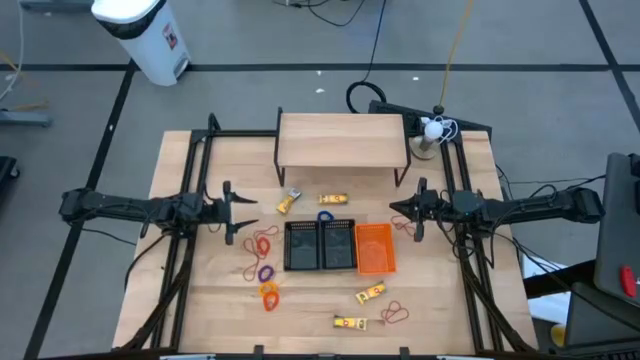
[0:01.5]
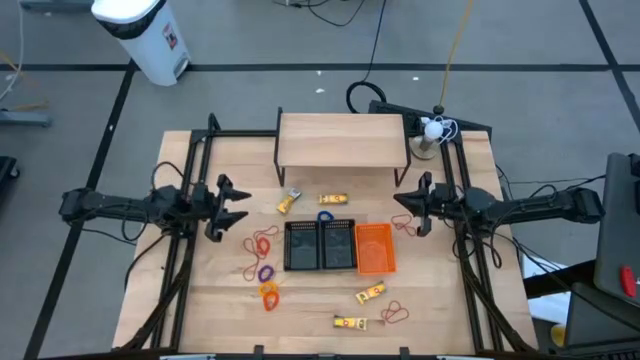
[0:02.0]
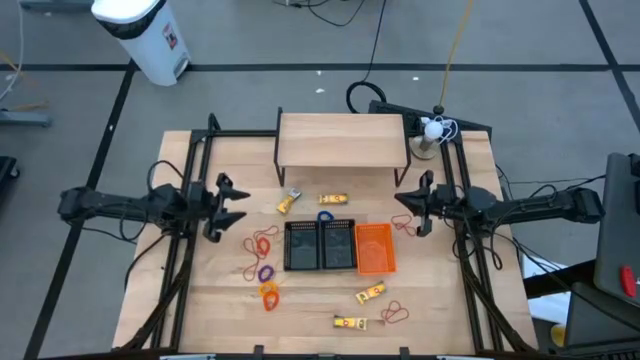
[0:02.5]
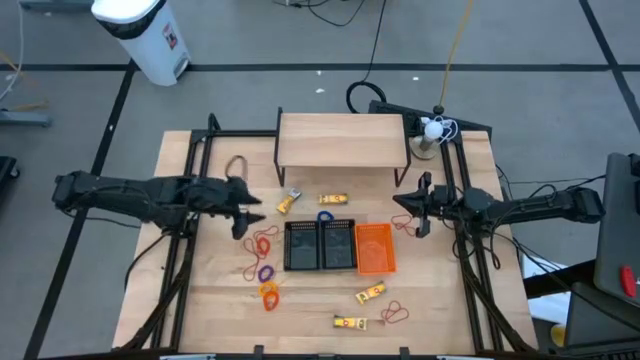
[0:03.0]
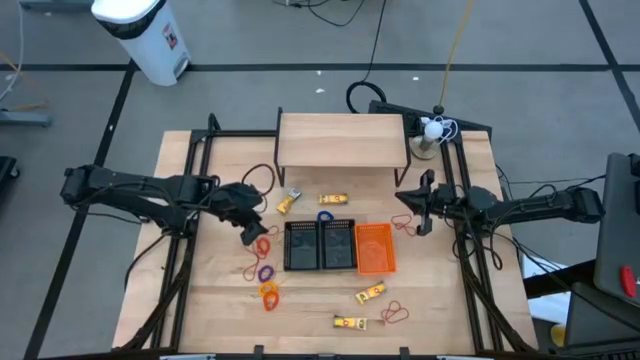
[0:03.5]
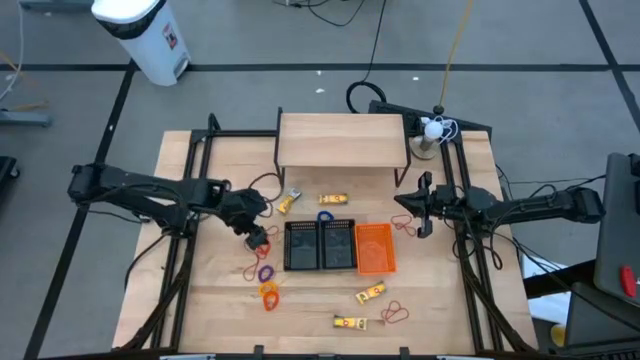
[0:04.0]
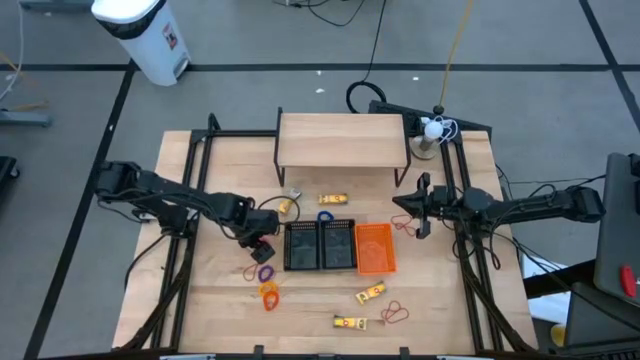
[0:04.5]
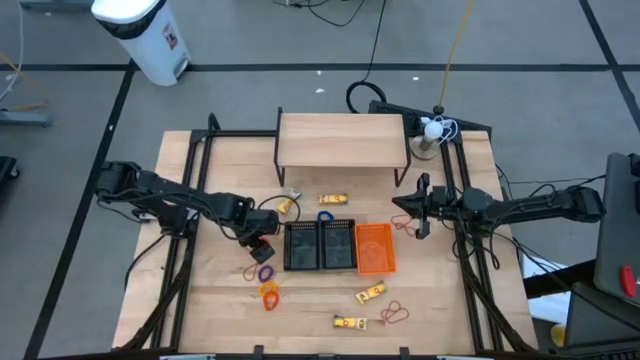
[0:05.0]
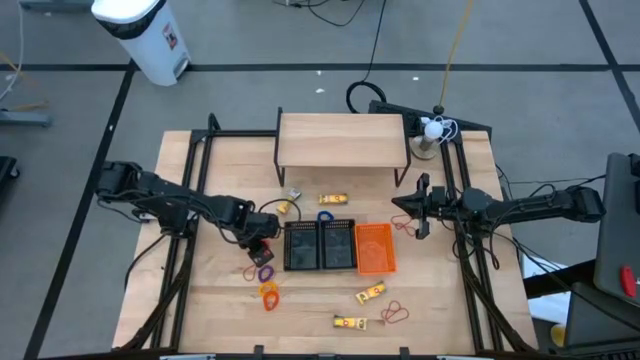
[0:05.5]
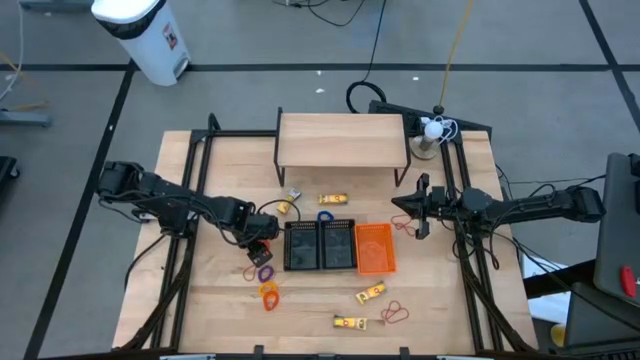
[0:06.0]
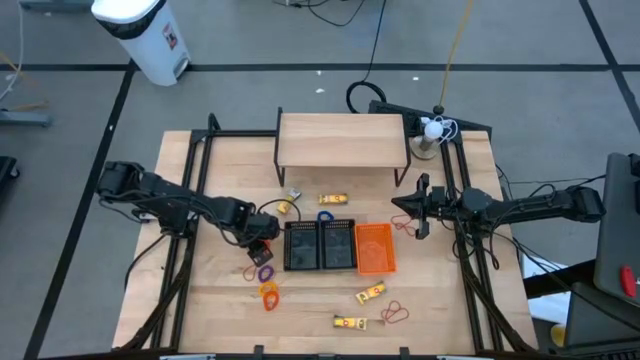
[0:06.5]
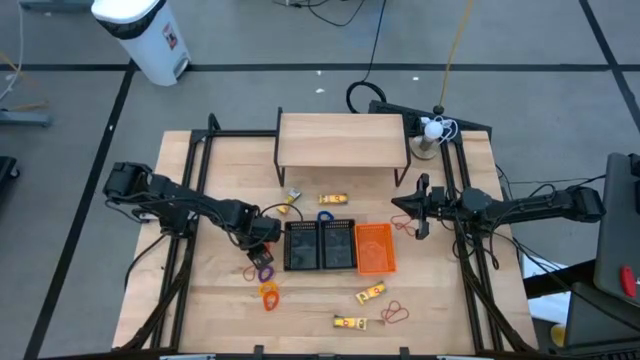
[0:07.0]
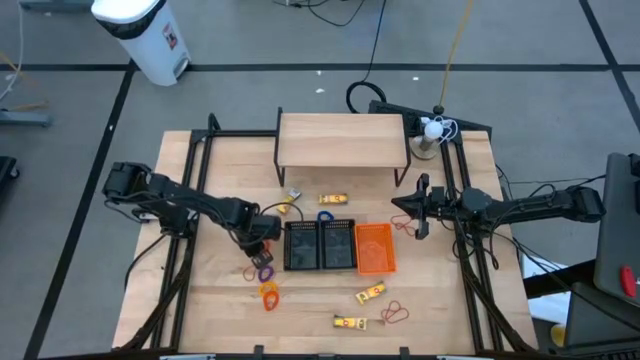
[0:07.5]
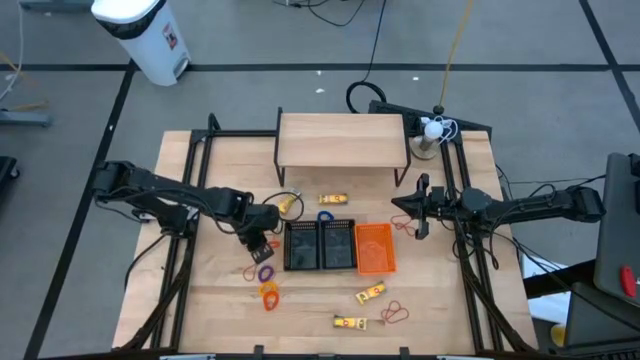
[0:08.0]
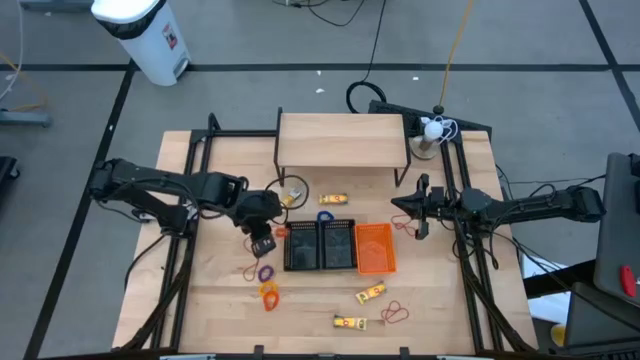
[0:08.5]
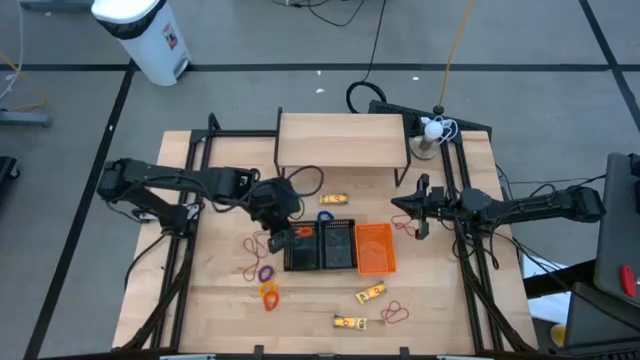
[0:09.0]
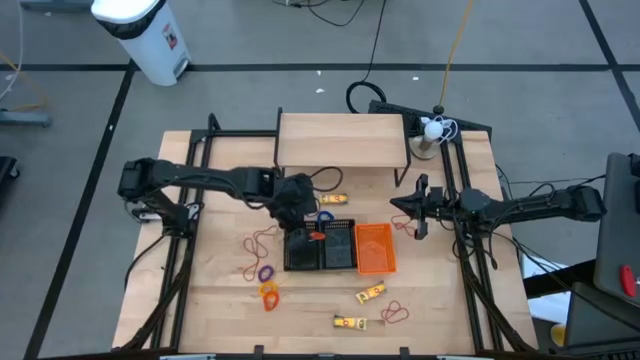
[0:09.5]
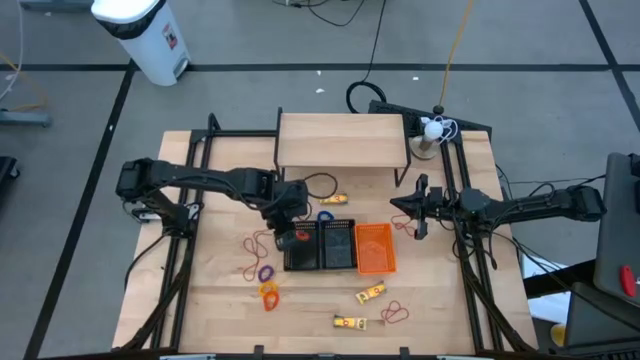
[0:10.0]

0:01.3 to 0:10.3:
Task: Pick & Place Office Desk Supplies
Put the orange spring rubber band into the left black basket

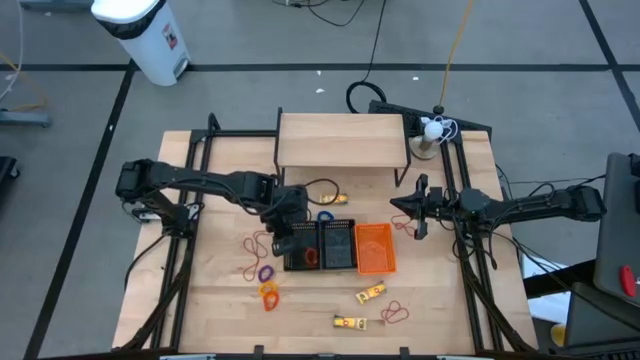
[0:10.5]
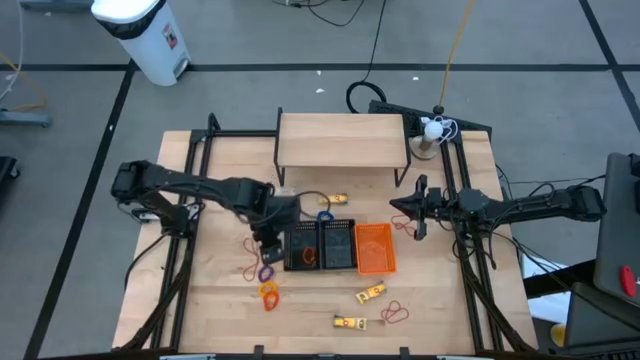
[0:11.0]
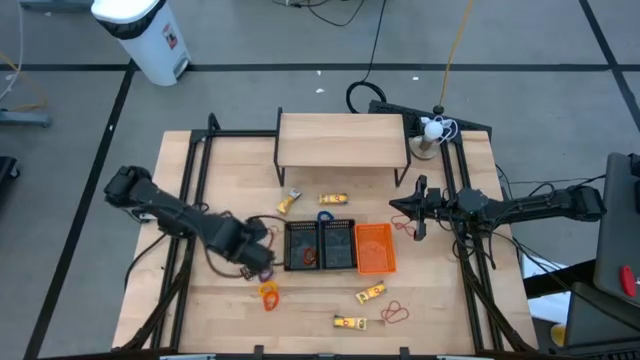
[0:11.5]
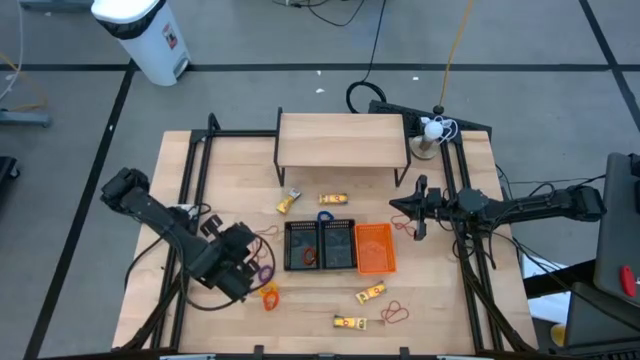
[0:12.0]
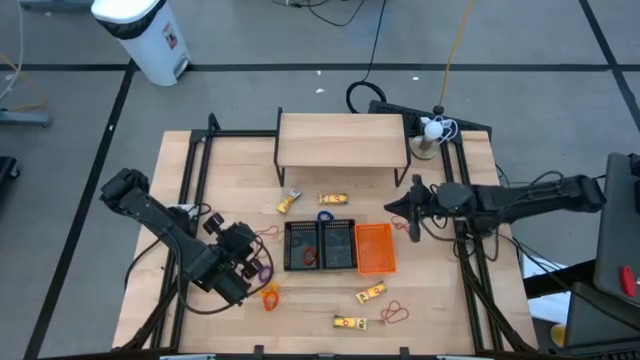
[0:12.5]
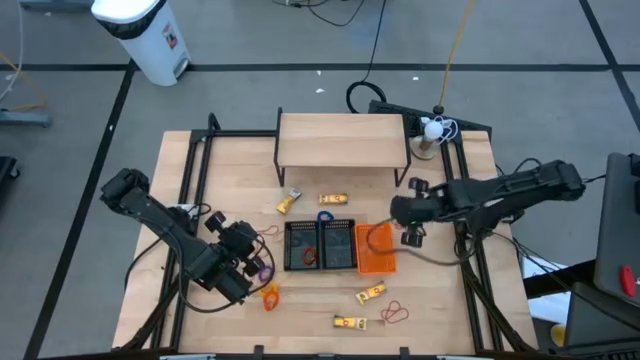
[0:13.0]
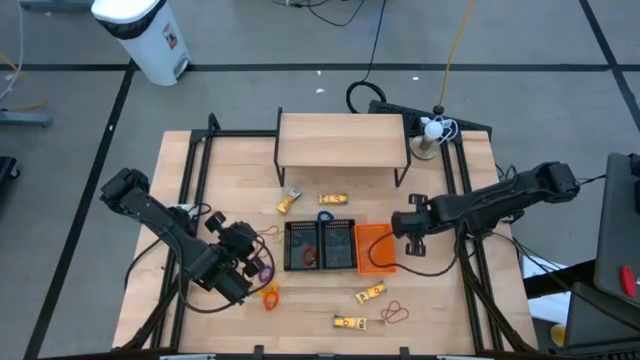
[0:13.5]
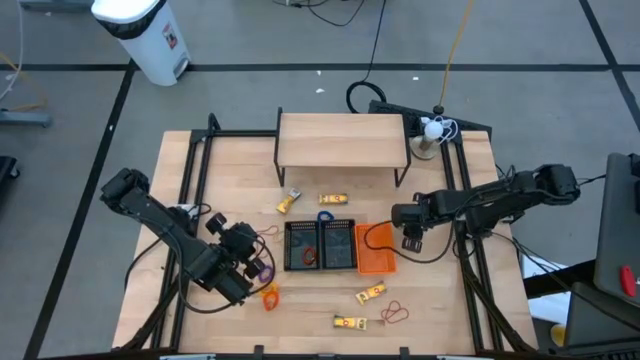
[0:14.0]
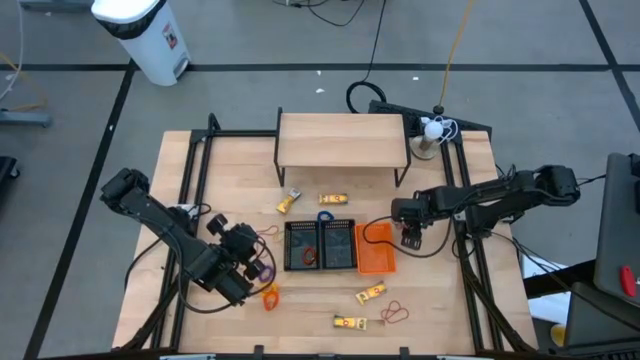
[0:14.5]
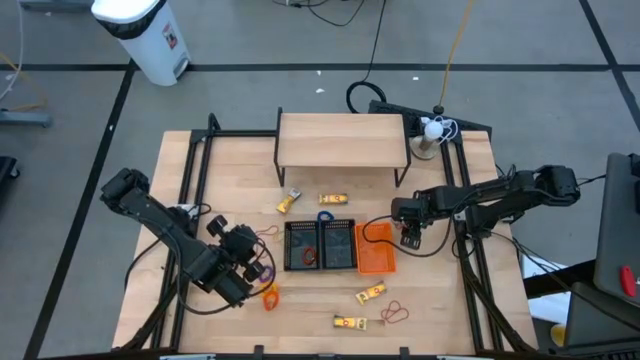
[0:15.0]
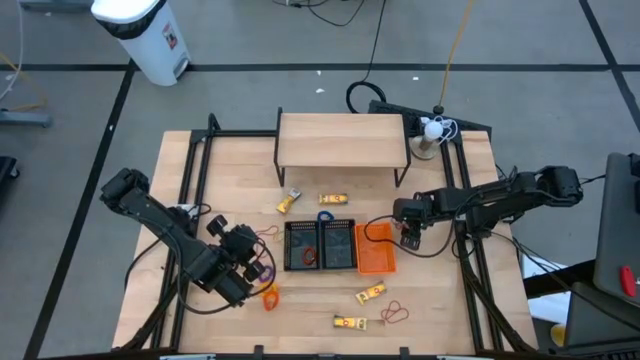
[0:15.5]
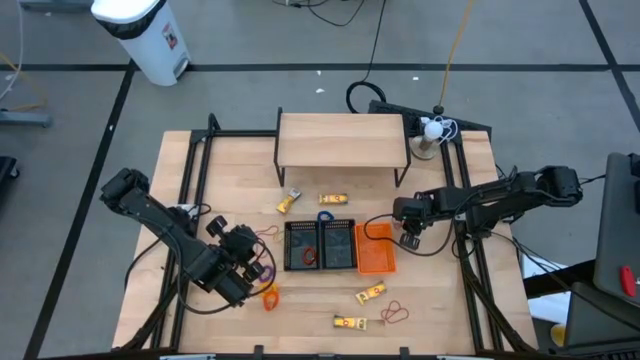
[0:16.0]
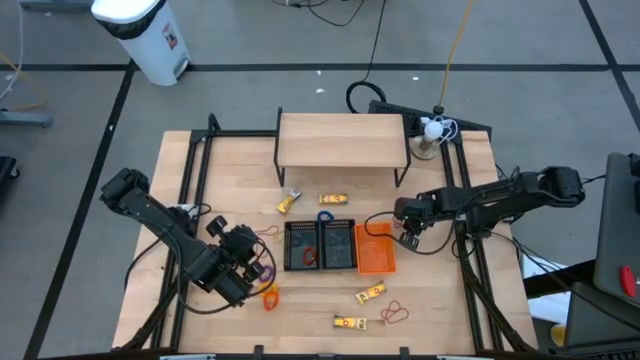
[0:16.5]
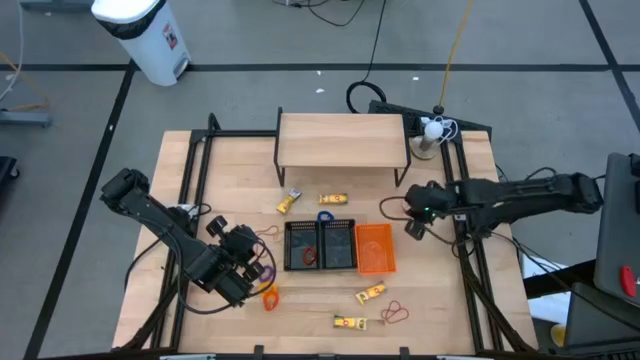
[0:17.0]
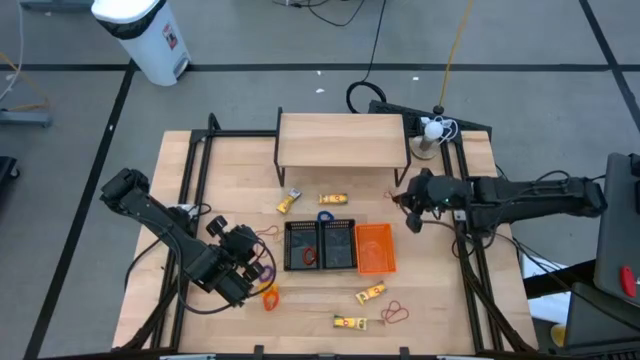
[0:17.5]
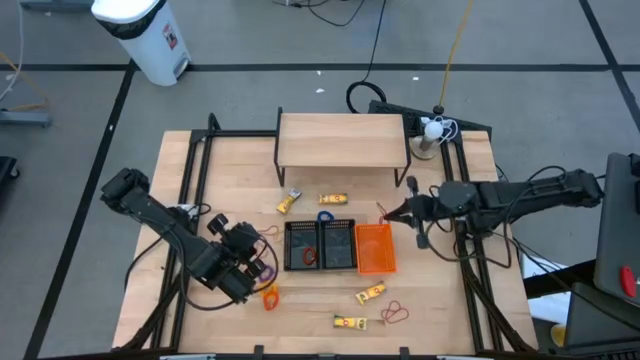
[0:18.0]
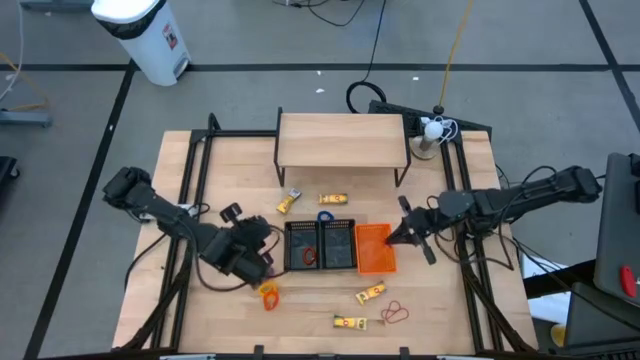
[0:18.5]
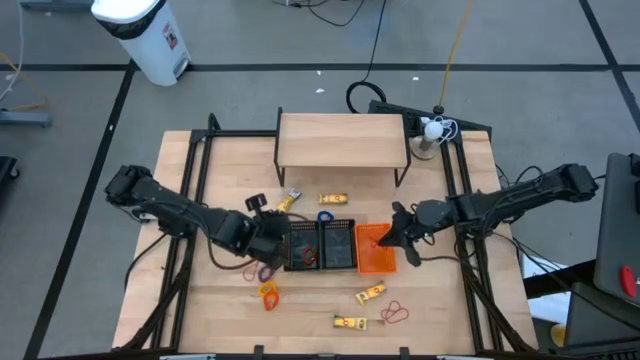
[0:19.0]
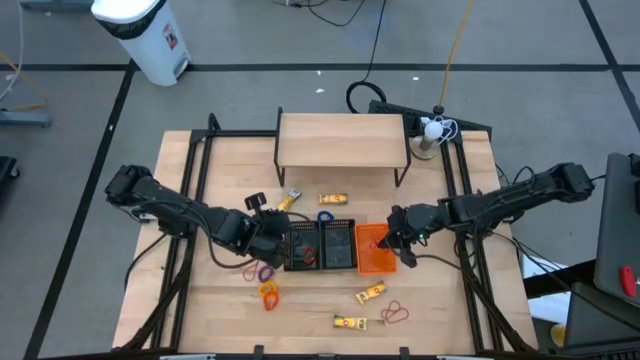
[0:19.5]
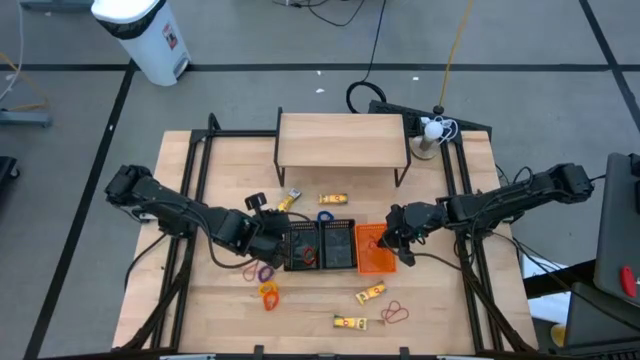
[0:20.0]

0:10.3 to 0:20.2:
Put the rubber band into the orange basket

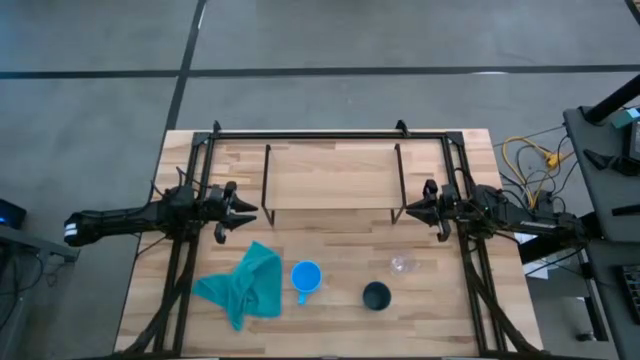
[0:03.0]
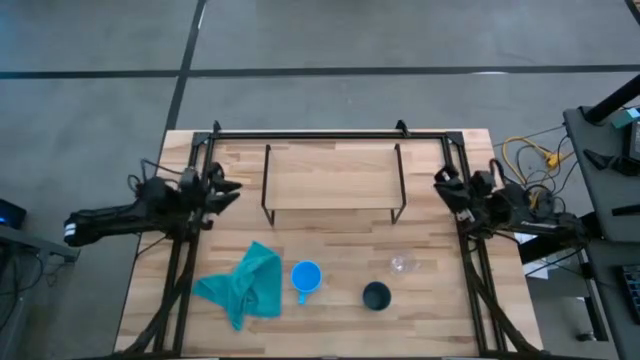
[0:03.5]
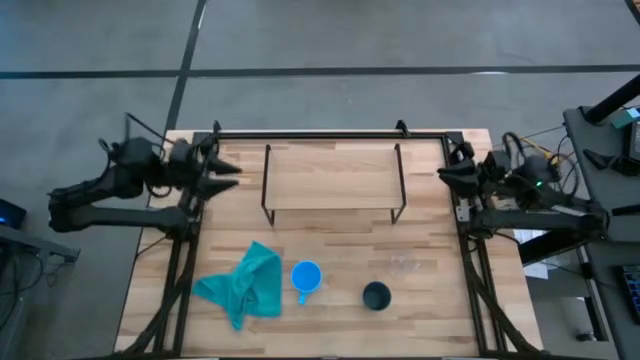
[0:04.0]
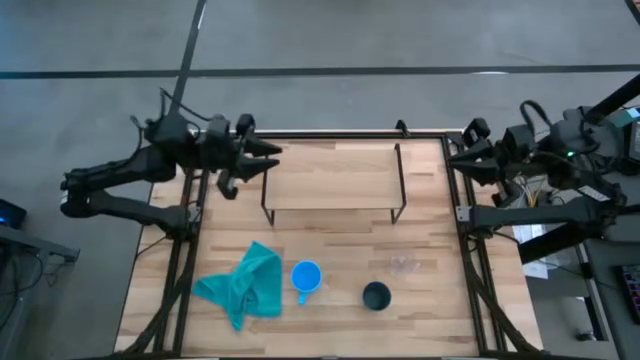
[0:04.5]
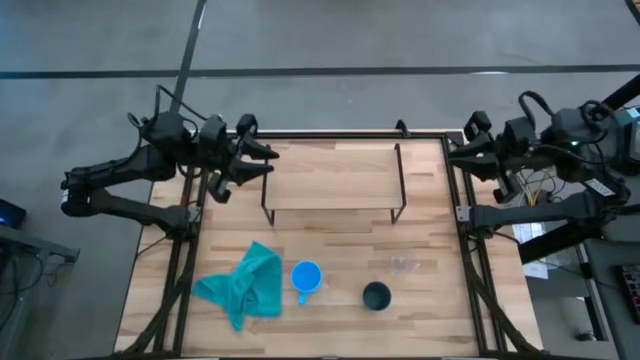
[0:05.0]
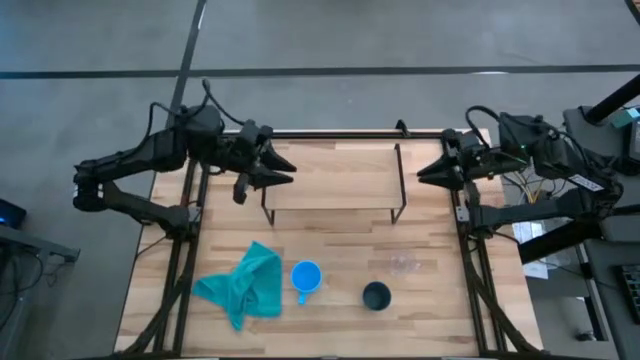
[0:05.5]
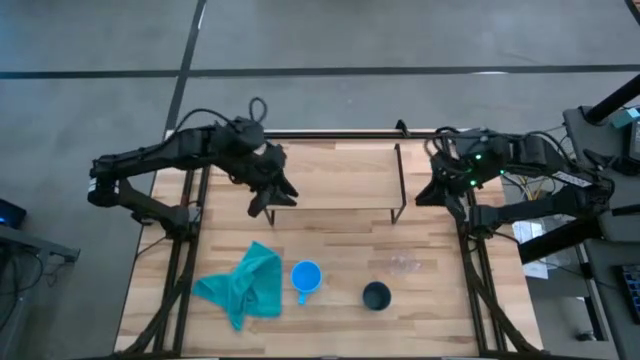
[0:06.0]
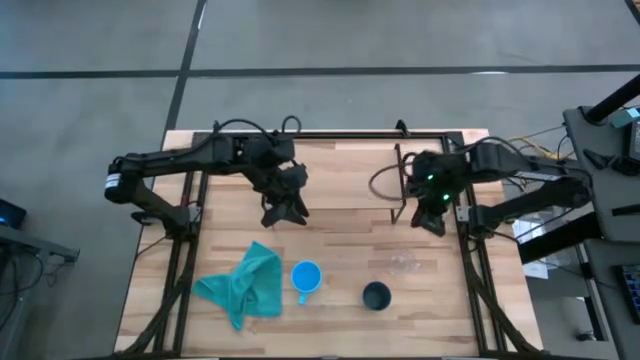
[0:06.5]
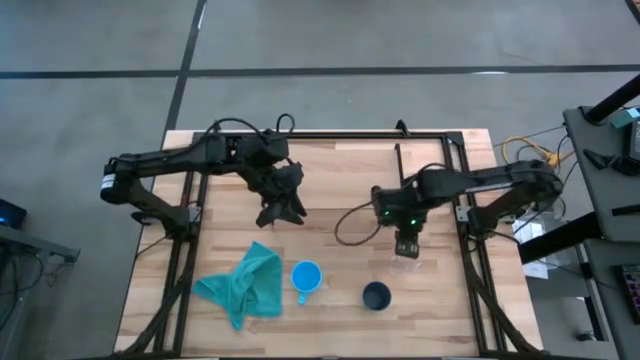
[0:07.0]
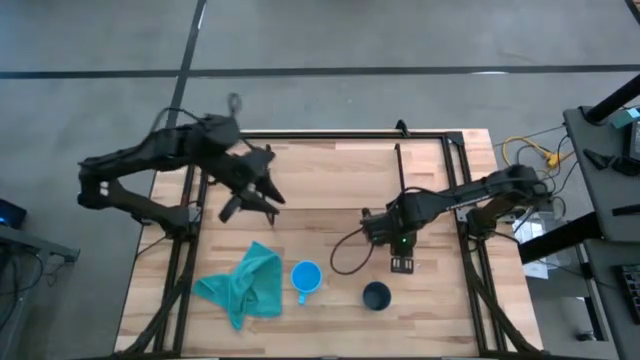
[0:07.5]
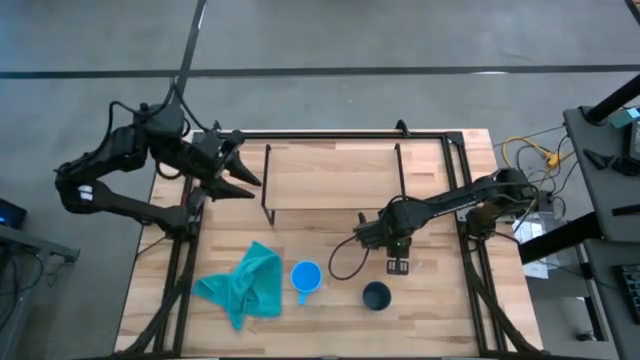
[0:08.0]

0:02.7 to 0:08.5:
Task: Stack small to large cups/mugs on shelf
Put the transparent mug on the shelf
